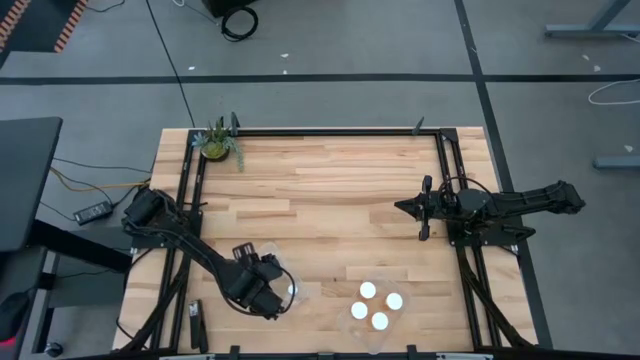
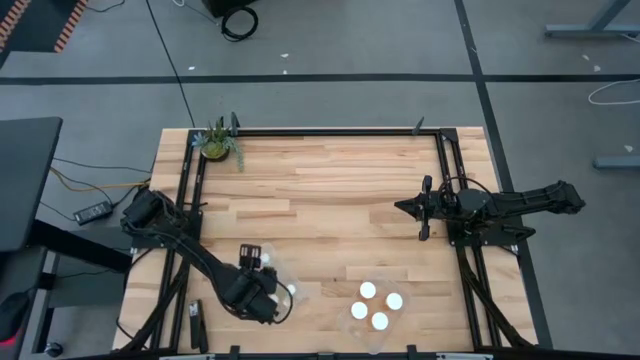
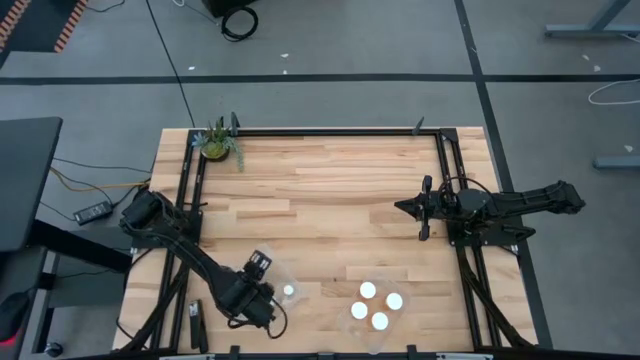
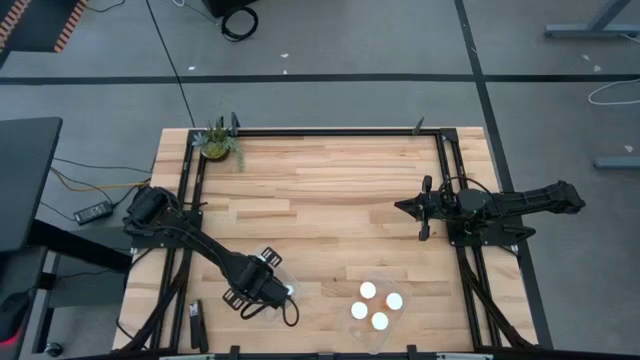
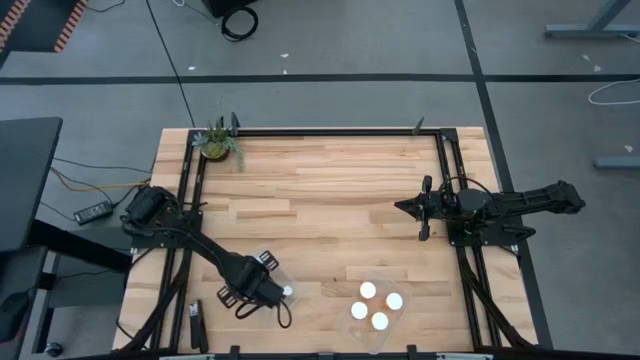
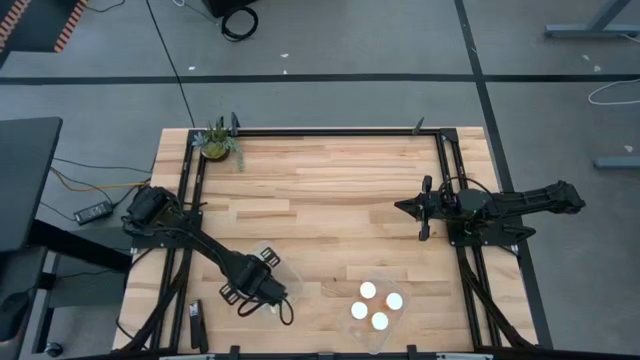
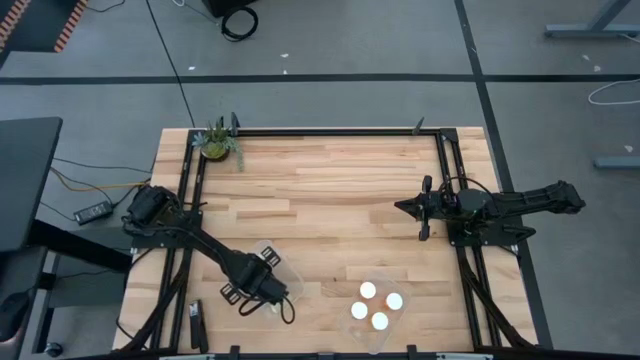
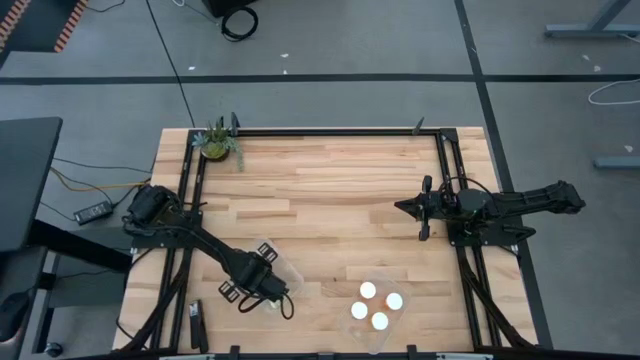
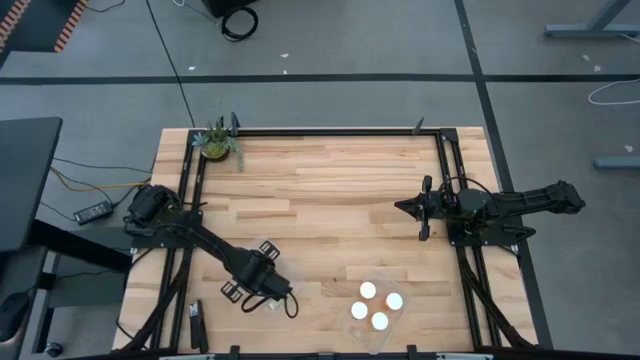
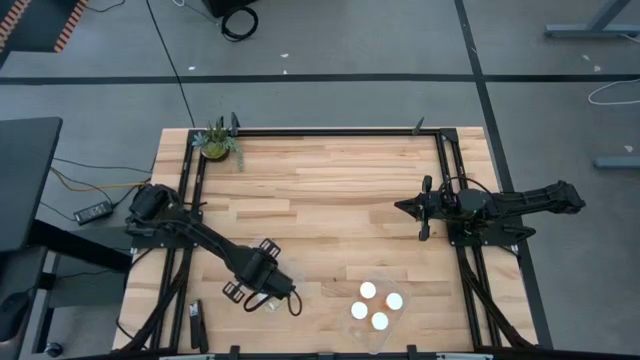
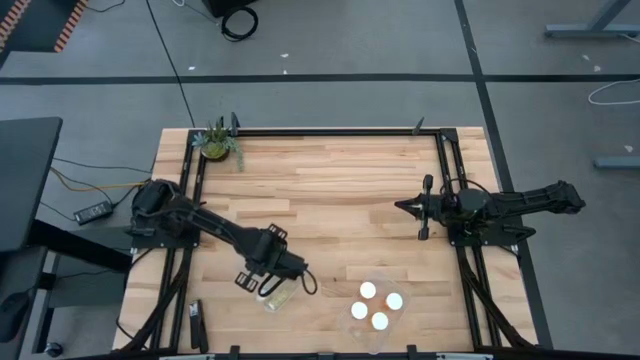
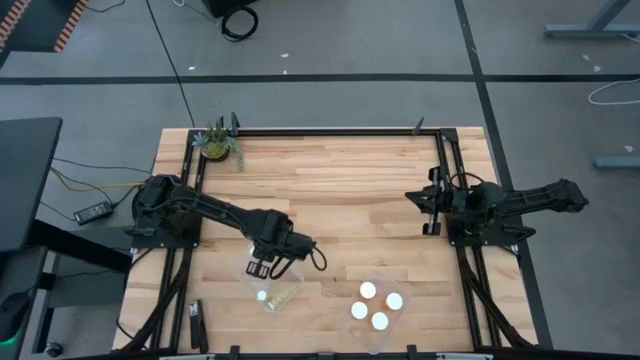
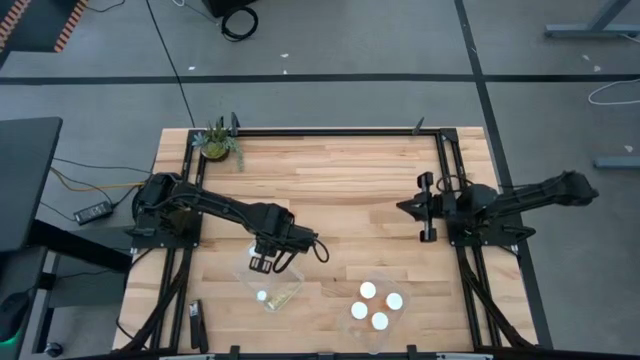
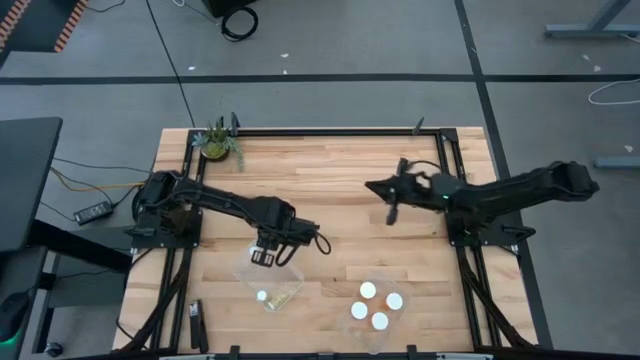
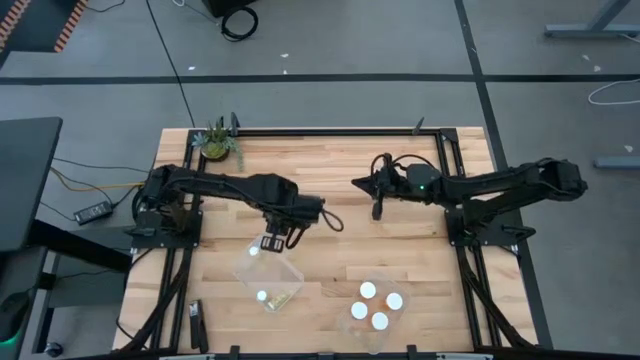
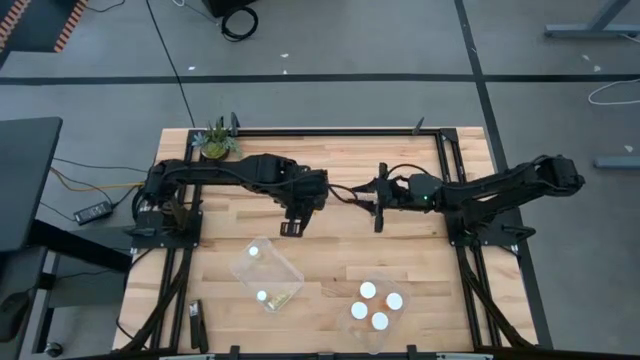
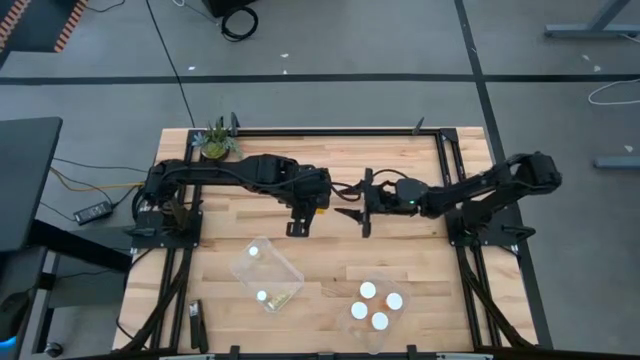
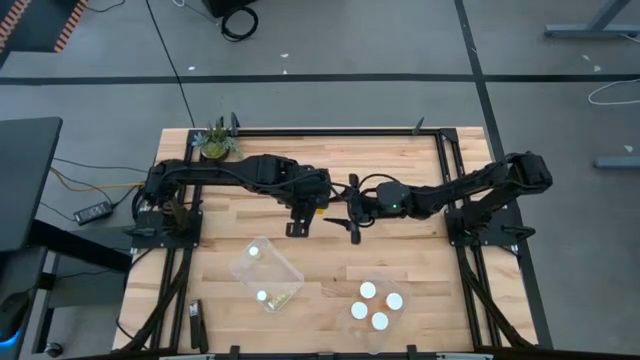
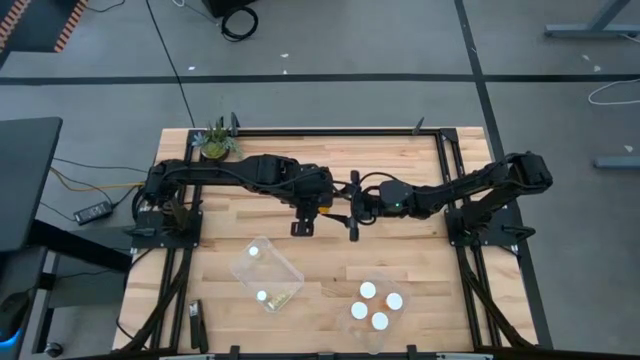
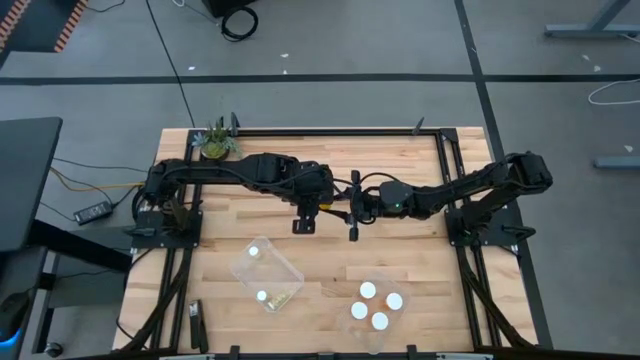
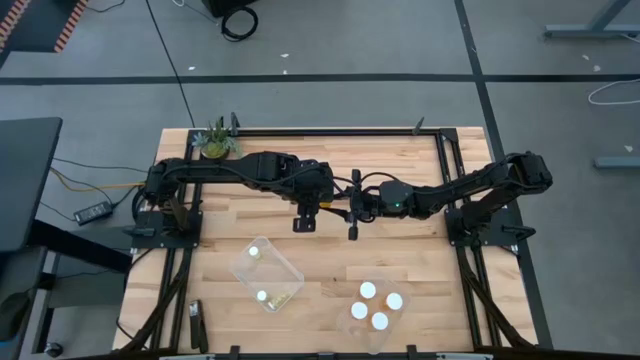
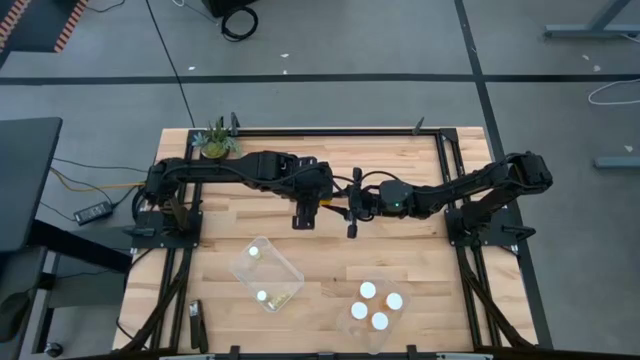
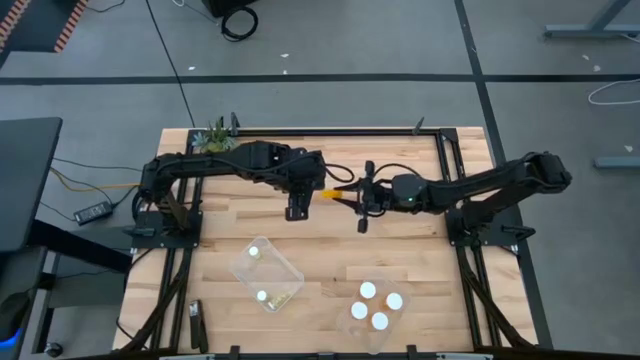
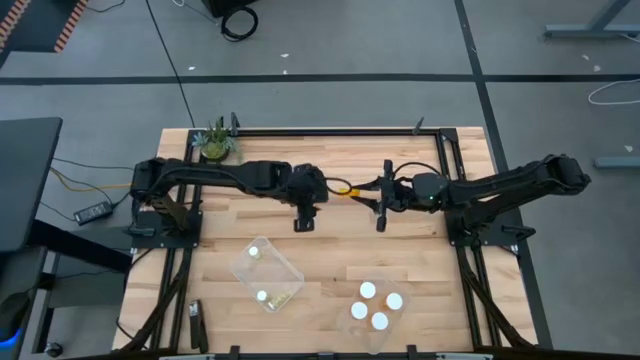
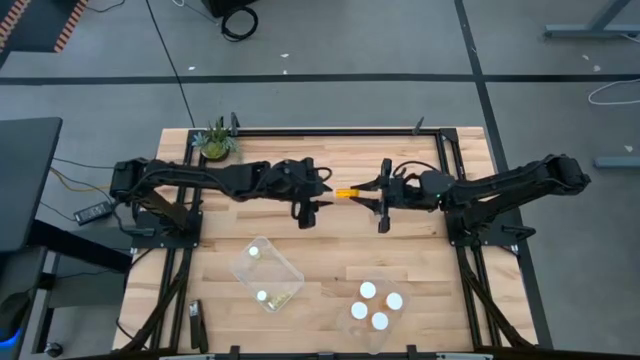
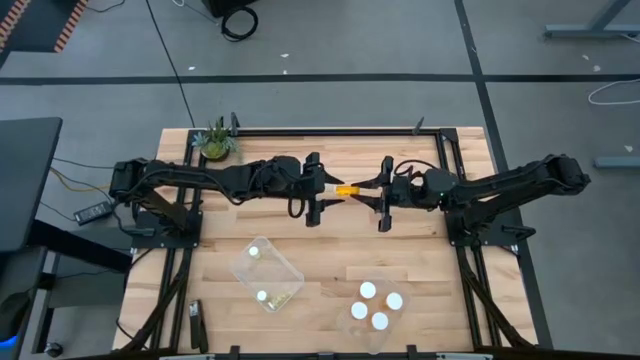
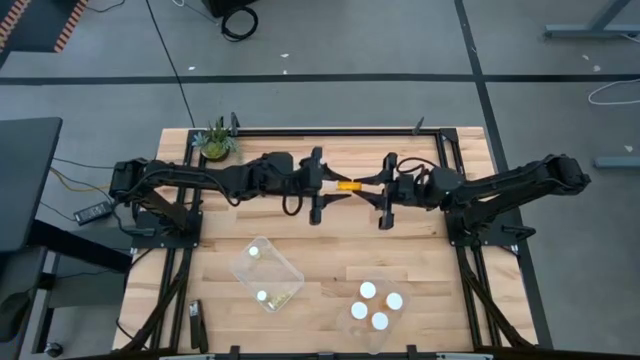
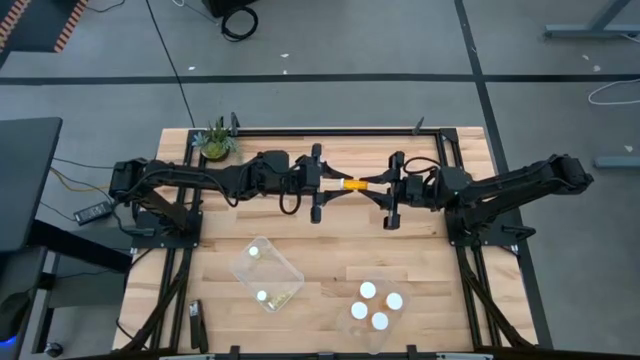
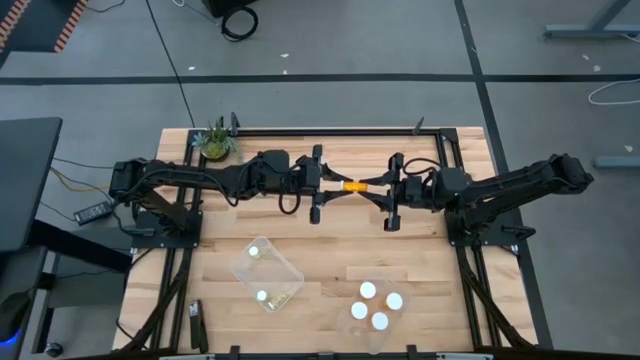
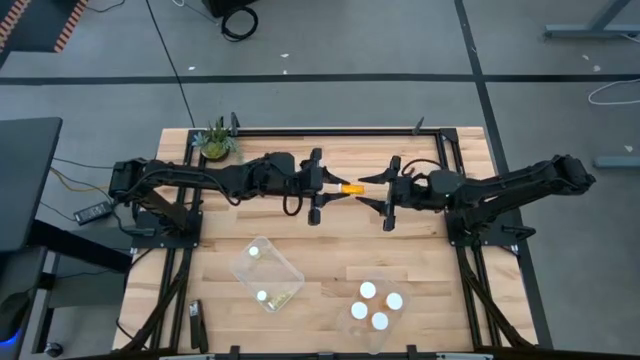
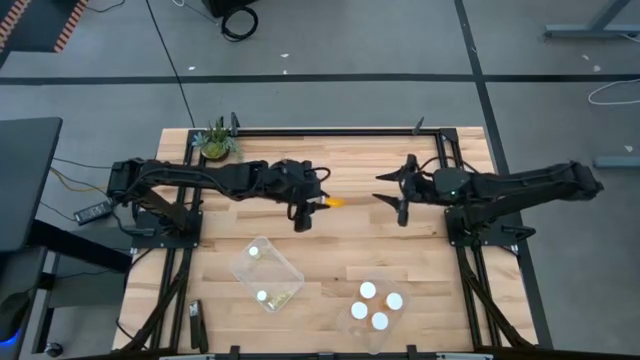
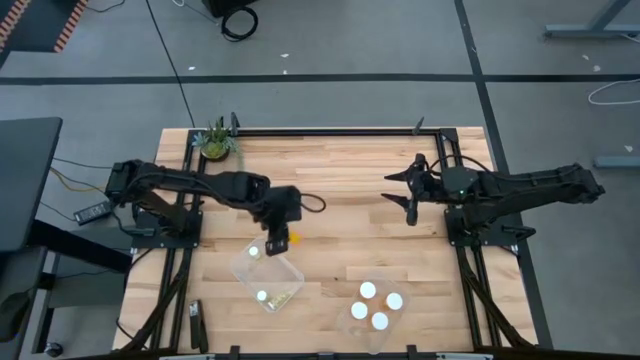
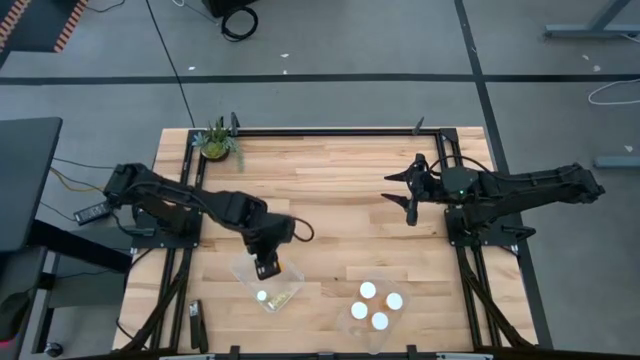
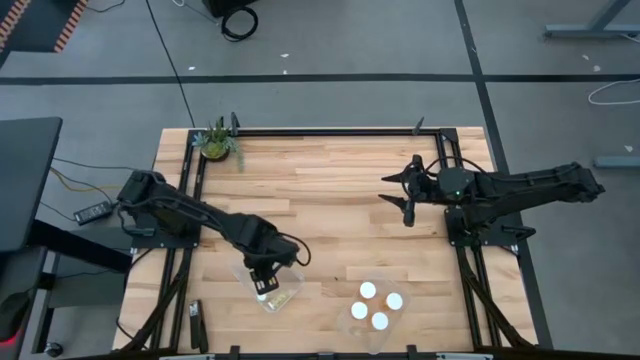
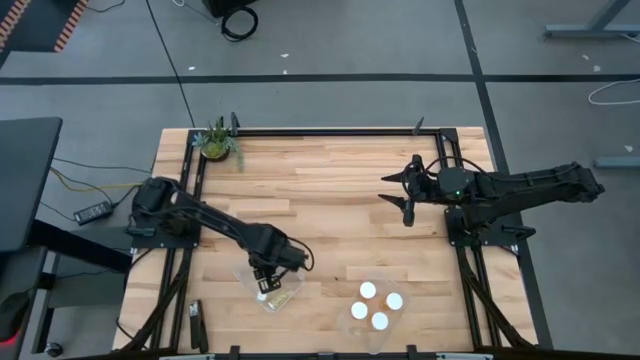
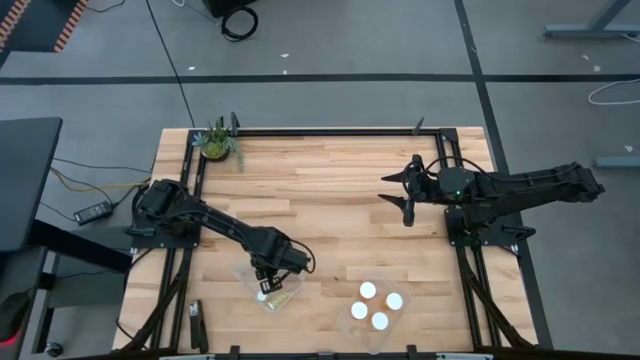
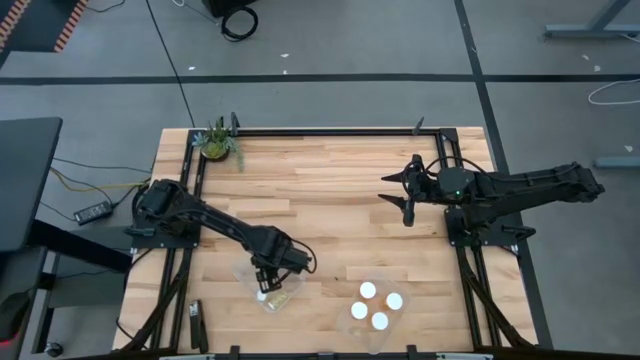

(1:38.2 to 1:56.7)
Task: Pick and place medicine bottles into bin by pill shape (circle, oval)
Put the small orange pill bottle into the left transparent bin

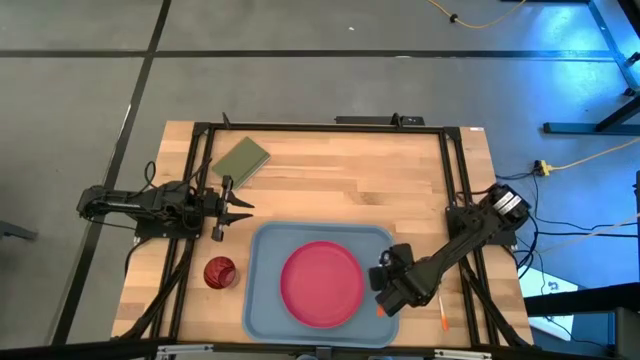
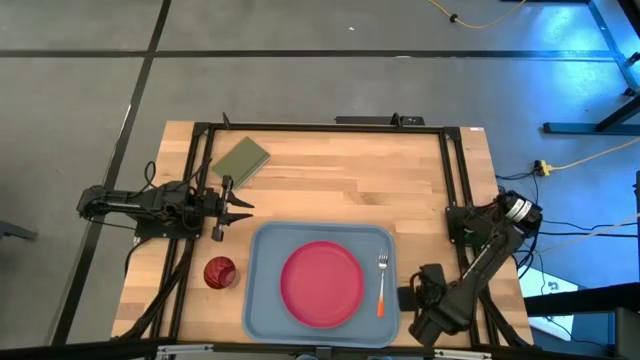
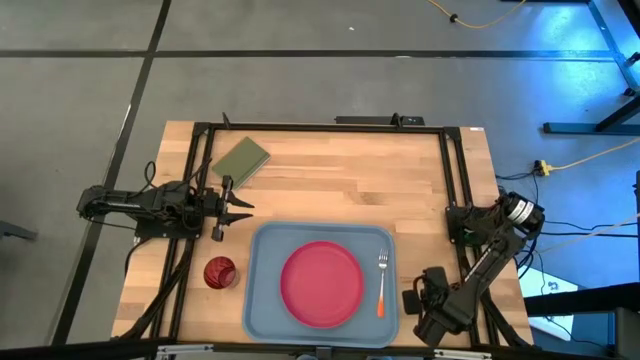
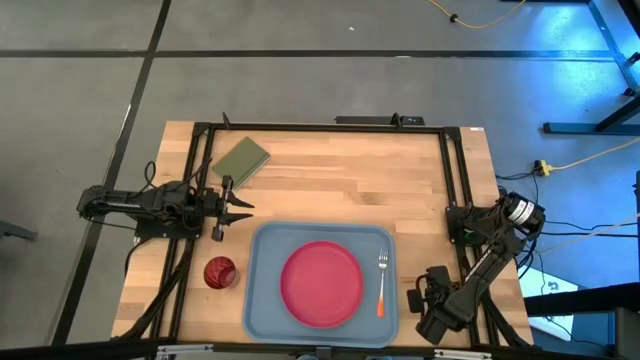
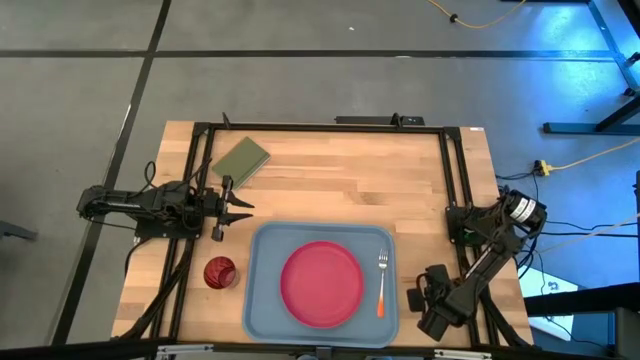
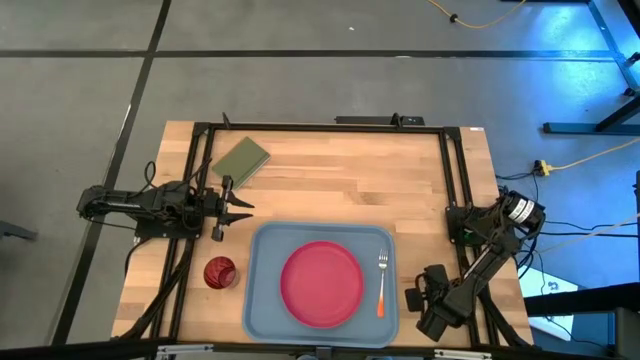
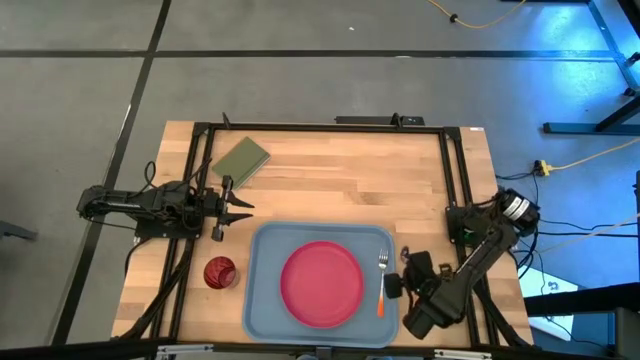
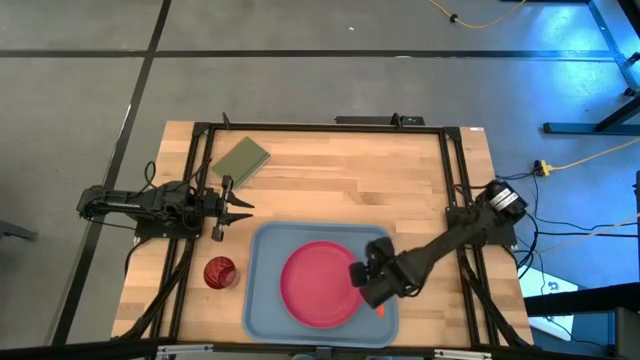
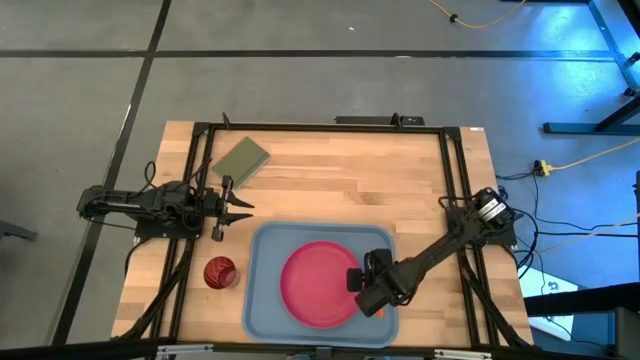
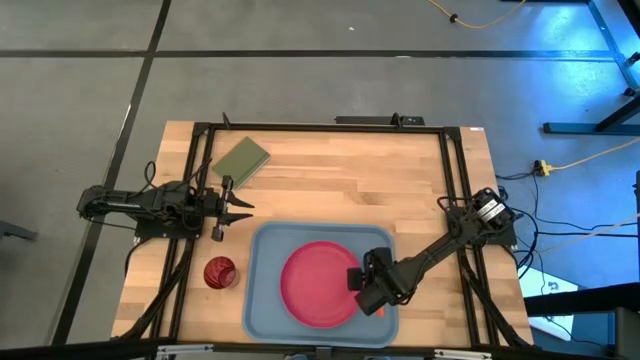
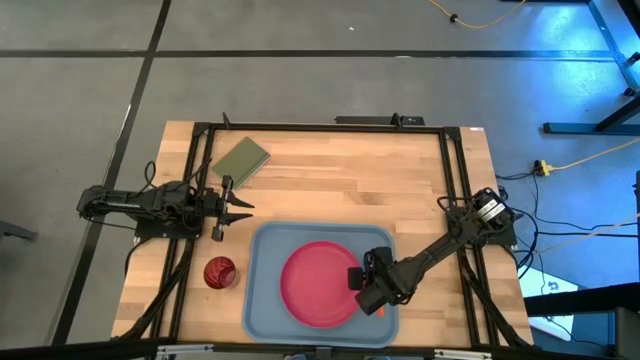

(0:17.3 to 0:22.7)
Task: Pick and place plate/cup/fork/spoon on tray
Put the orange spoon on the blue tray to the right side of the pink plate
